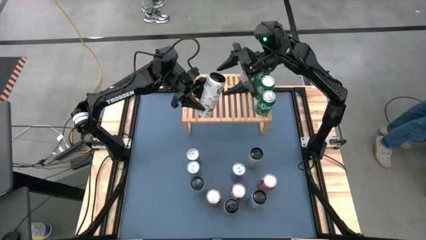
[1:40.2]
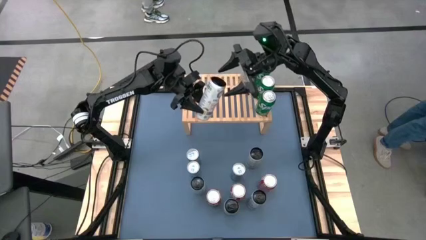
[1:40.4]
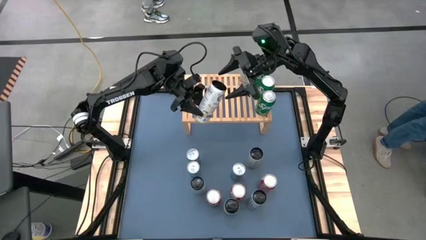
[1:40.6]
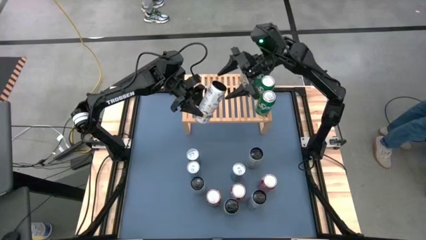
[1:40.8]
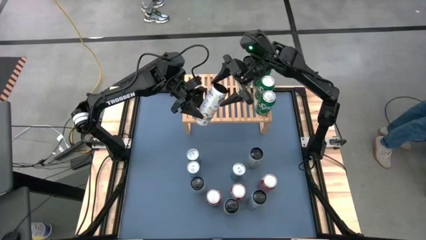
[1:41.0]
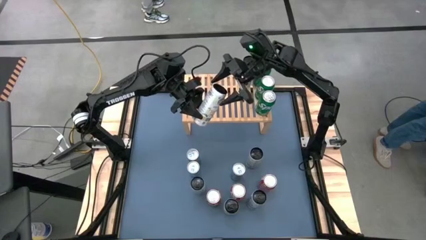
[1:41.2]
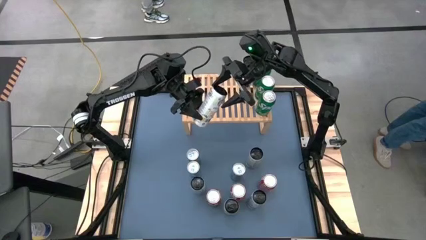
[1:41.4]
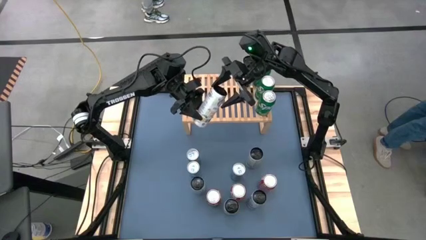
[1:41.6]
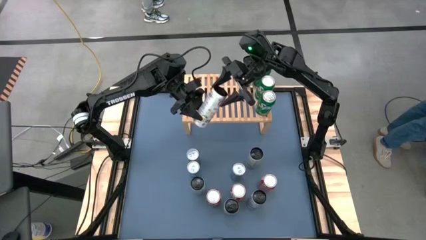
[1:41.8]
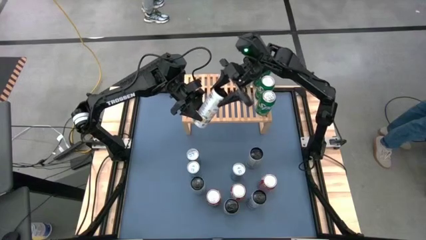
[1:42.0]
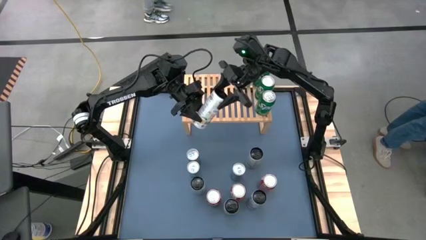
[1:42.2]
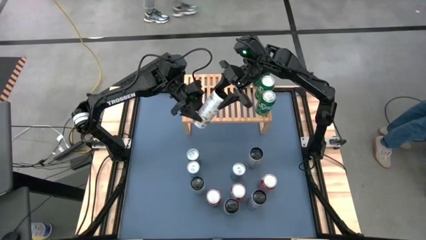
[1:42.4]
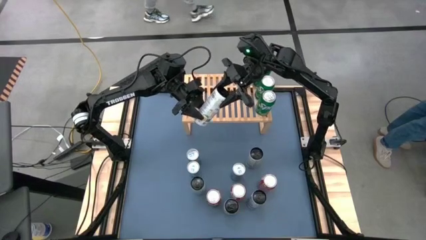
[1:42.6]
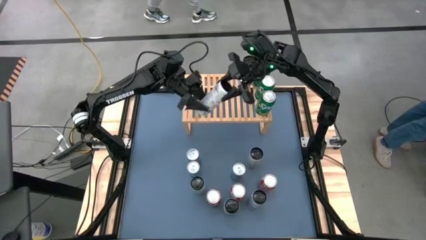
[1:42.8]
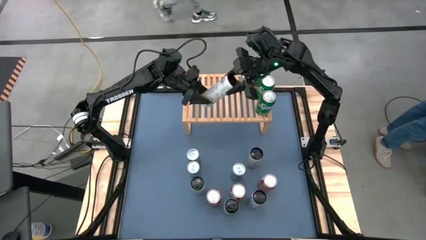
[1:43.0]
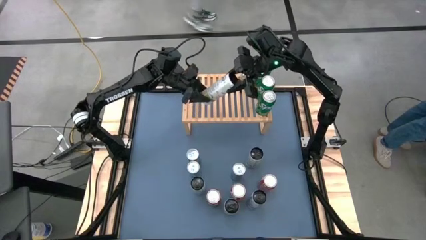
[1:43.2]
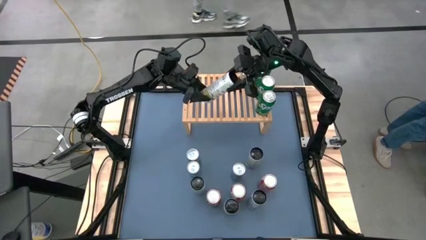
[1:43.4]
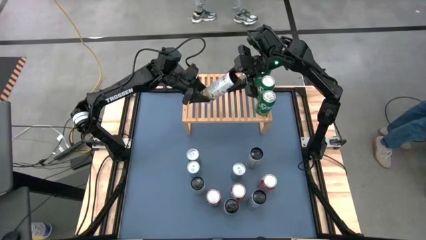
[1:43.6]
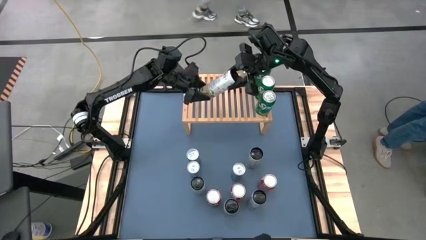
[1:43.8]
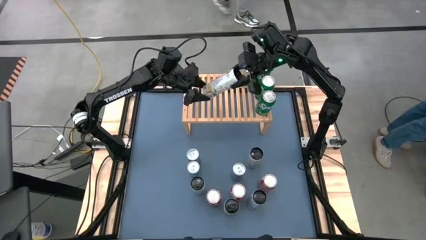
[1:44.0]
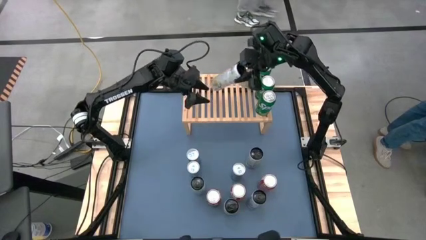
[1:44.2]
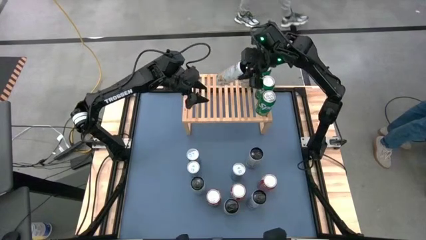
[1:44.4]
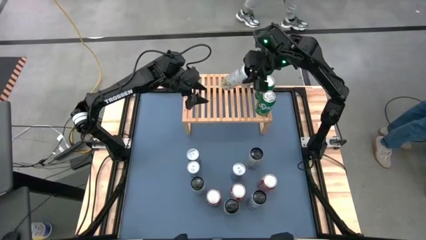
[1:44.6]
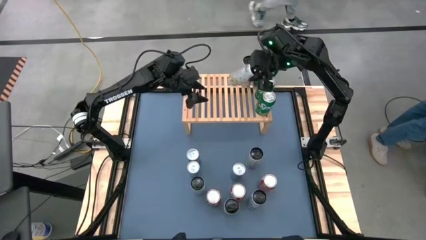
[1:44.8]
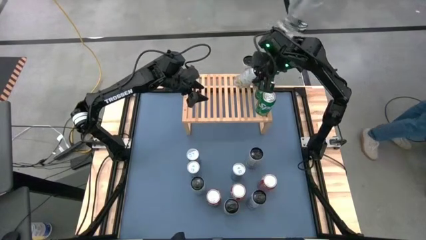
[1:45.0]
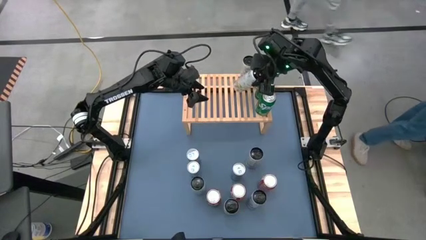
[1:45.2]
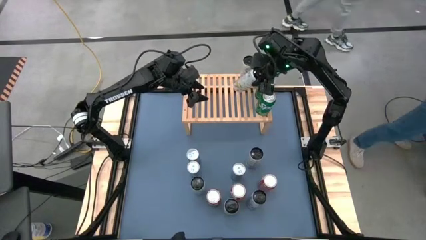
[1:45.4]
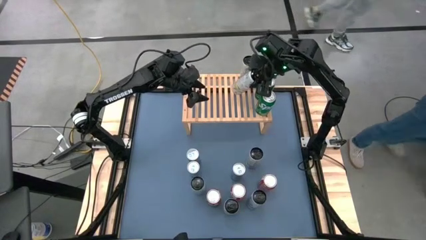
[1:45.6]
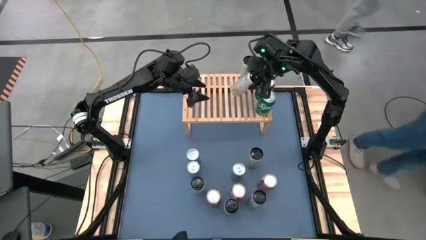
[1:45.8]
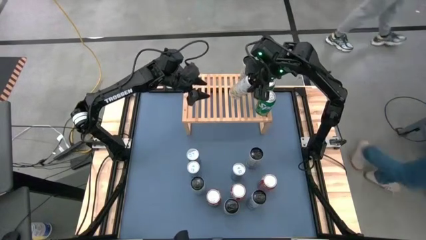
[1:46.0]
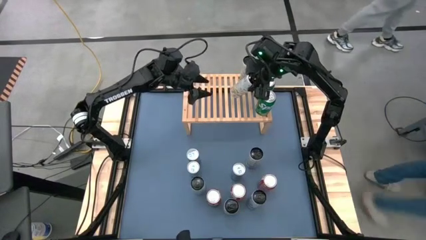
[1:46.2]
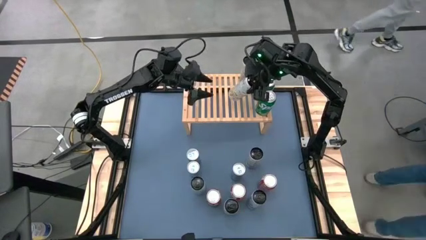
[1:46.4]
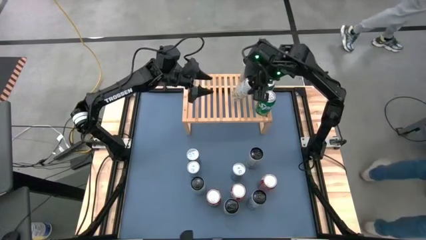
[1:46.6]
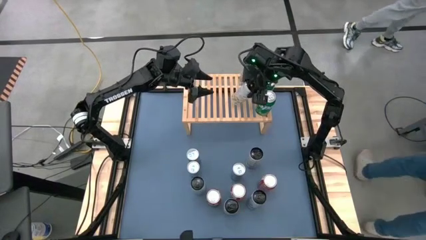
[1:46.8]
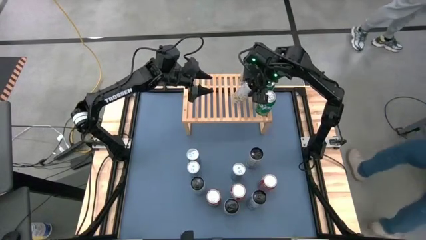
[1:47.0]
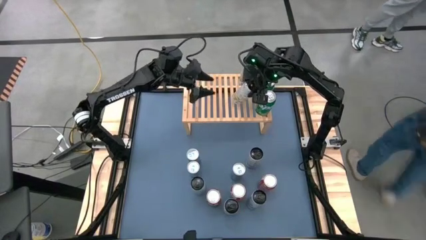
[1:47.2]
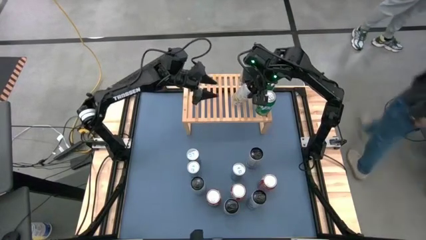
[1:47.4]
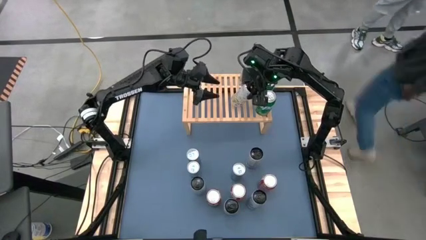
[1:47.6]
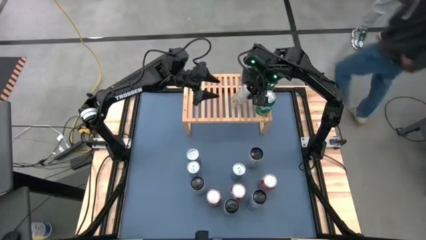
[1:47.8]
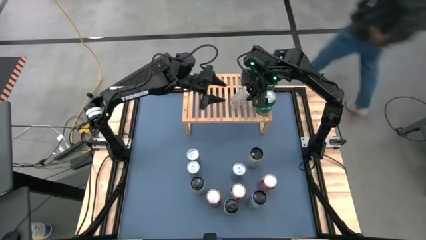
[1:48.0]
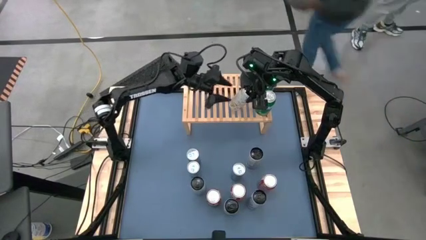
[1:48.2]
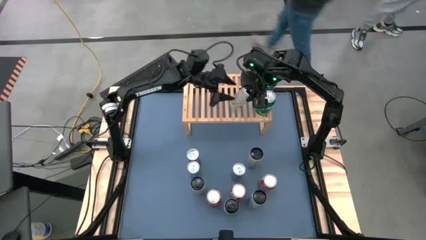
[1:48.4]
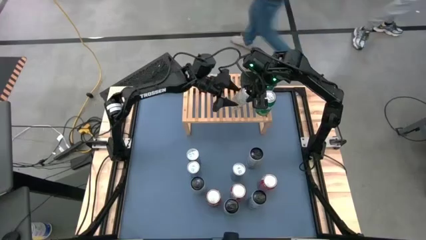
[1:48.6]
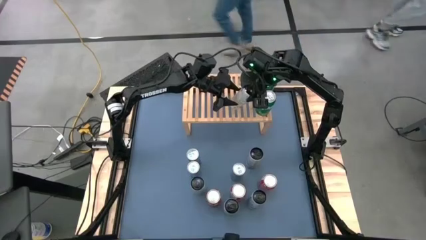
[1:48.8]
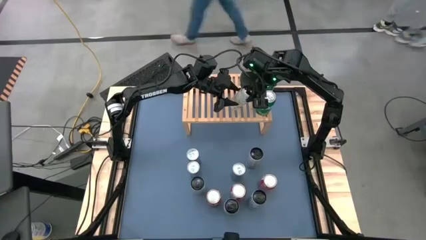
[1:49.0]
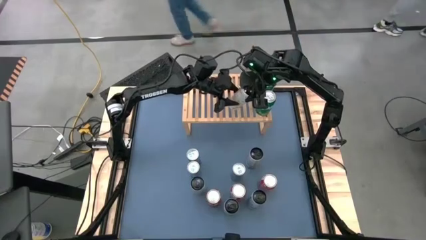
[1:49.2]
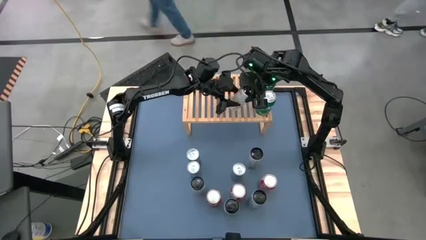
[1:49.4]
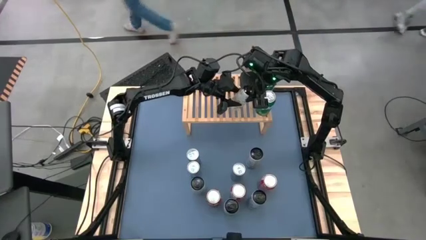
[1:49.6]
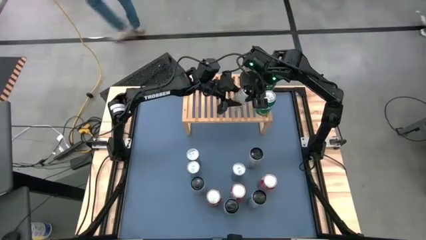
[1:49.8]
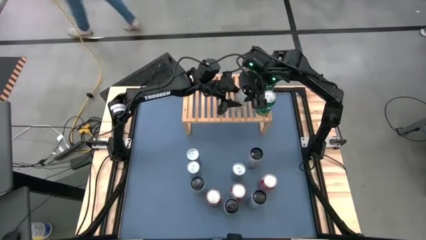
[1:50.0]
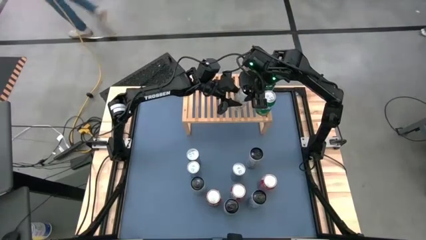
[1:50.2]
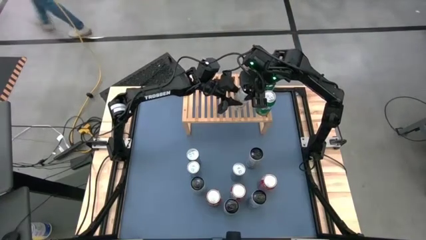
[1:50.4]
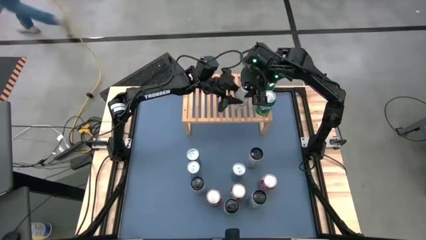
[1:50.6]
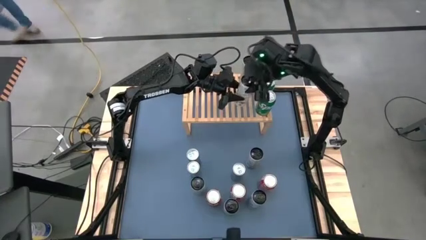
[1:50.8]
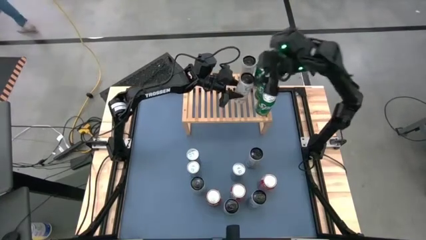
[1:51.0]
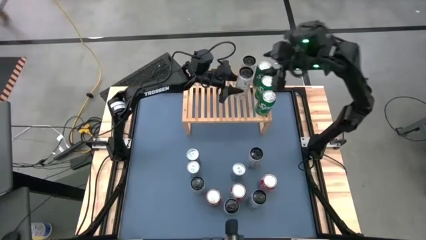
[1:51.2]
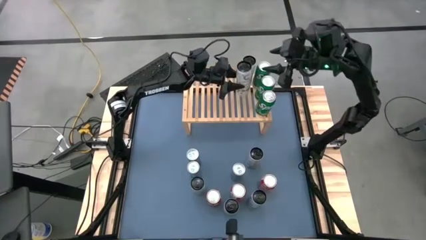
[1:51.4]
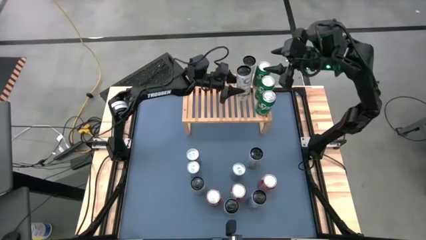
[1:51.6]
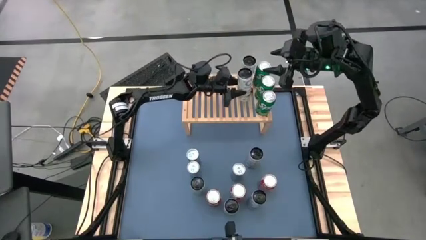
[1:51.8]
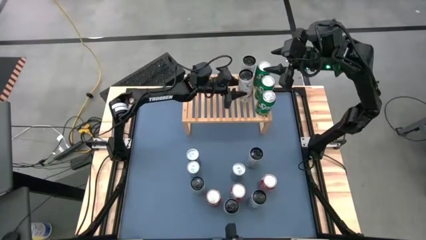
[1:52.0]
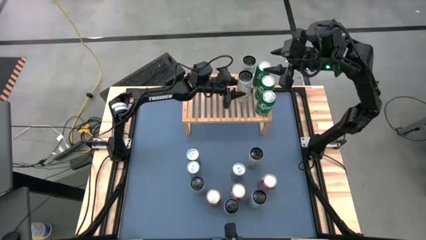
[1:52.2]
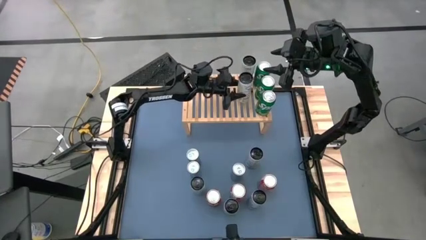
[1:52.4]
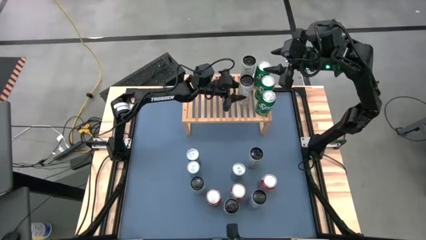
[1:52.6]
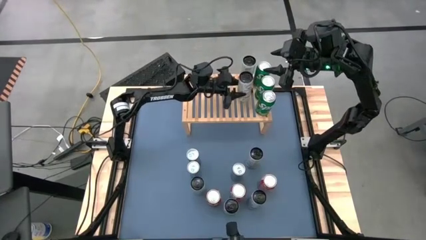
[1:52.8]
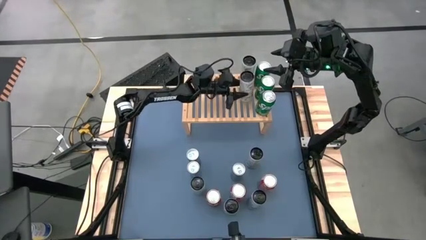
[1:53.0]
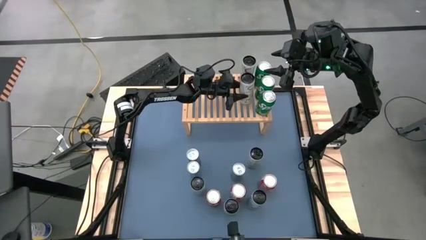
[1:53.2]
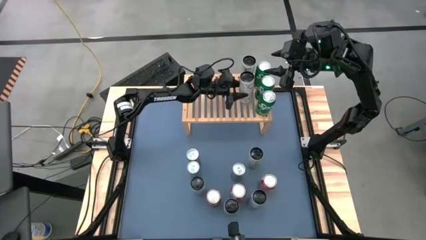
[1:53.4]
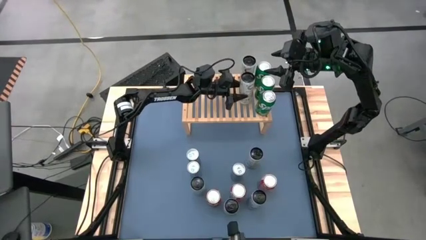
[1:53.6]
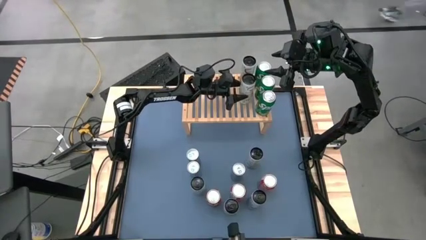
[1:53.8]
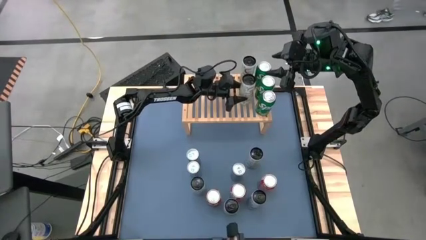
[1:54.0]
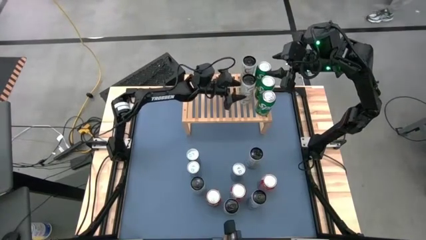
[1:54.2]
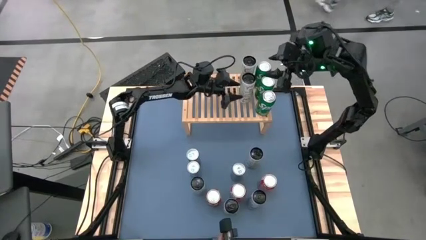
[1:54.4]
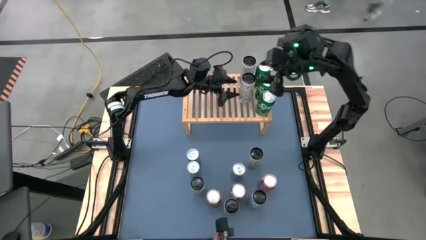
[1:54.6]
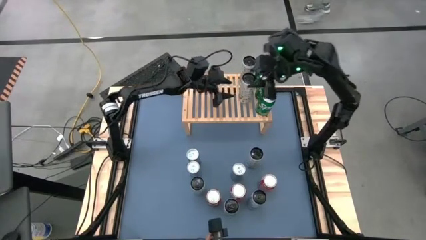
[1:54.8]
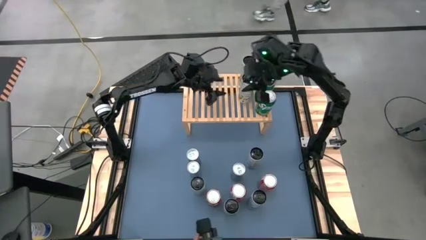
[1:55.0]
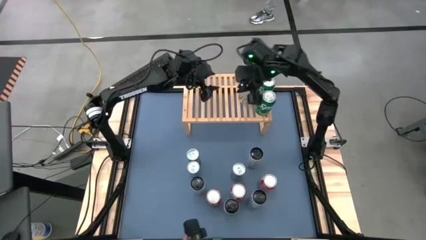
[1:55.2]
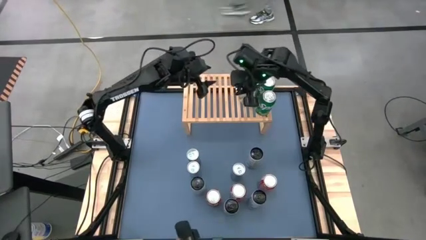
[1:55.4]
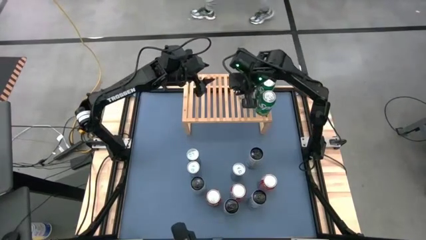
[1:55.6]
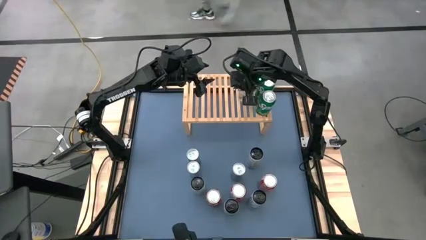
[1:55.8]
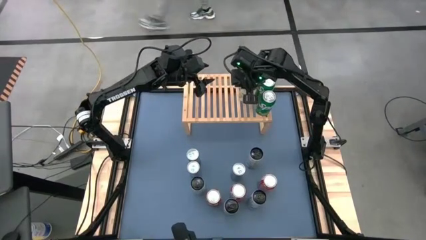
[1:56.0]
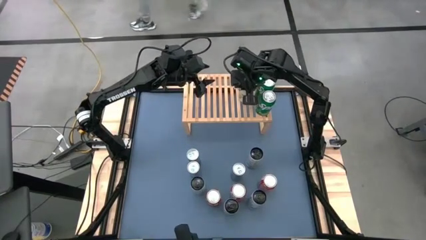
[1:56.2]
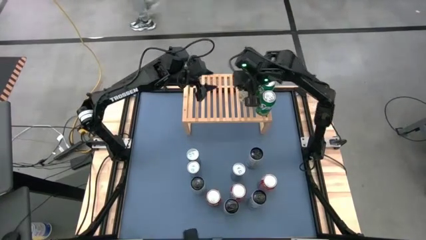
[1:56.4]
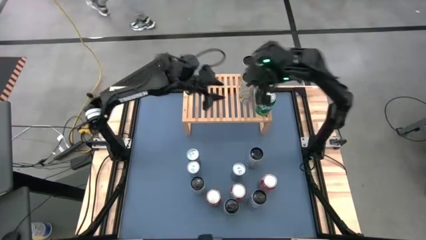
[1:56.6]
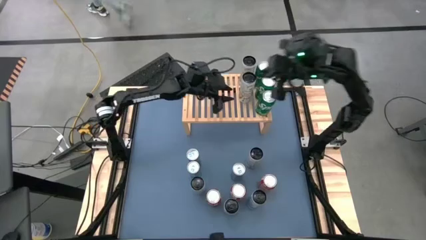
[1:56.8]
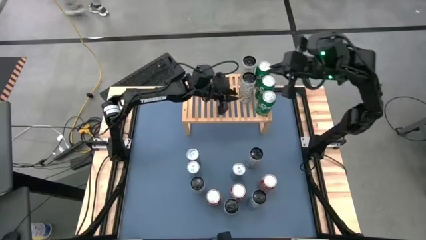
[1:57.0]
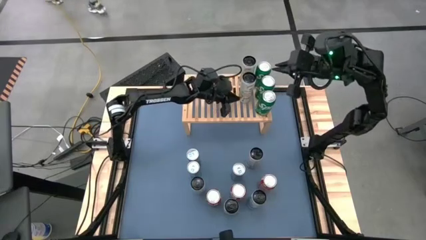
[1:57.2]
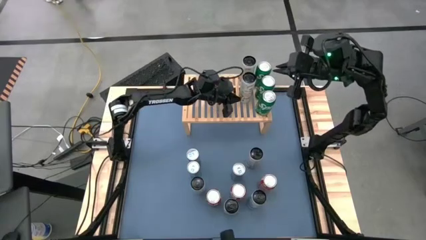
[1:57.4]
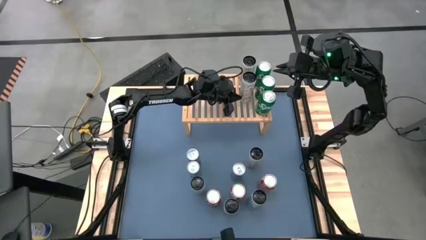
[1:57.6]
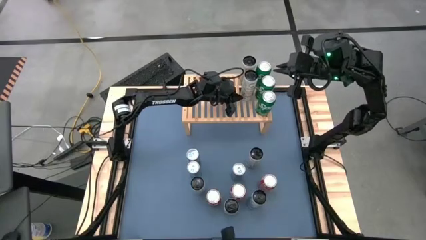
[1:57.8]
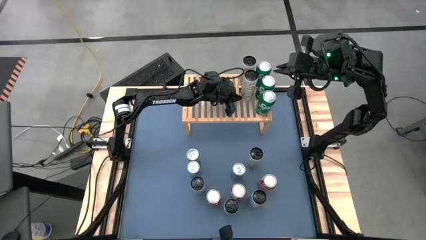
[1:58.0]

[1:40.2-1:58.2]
Task: Place canned beverage on shelf
Put the left white-yellow soda can on the shelf aligned with the other white-yellow soda can
